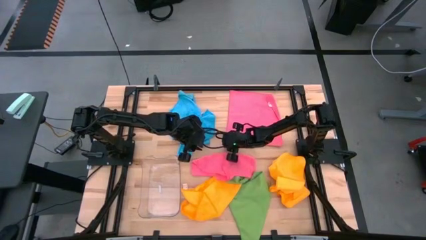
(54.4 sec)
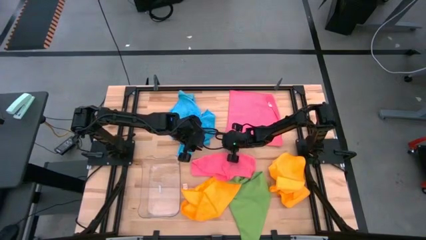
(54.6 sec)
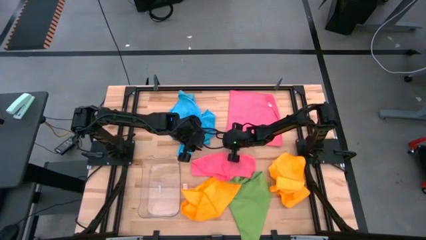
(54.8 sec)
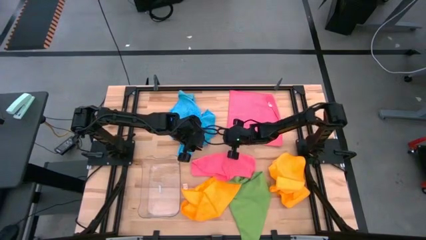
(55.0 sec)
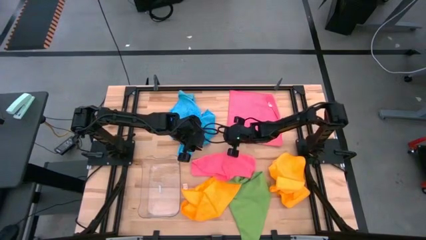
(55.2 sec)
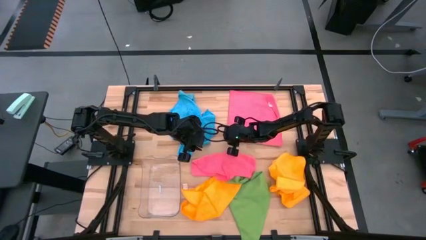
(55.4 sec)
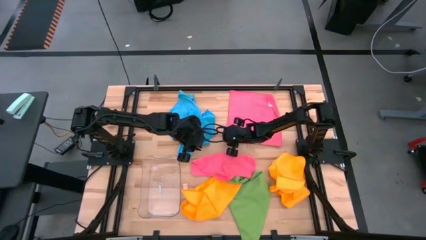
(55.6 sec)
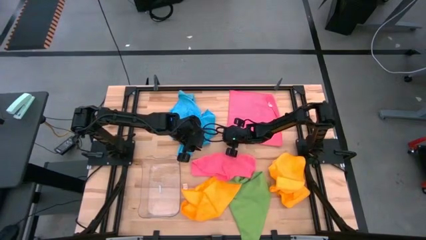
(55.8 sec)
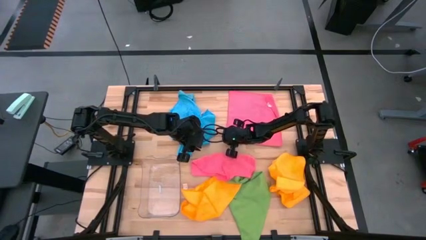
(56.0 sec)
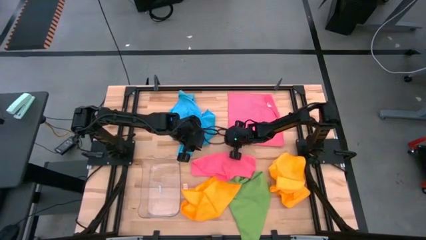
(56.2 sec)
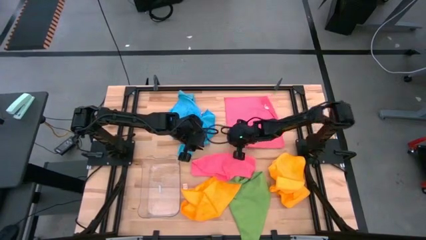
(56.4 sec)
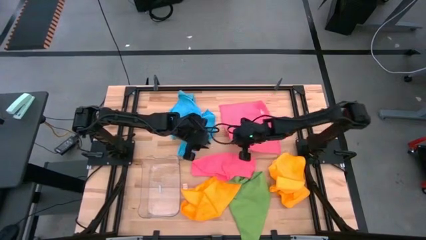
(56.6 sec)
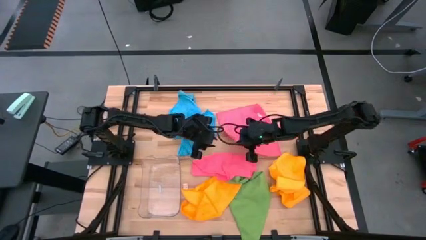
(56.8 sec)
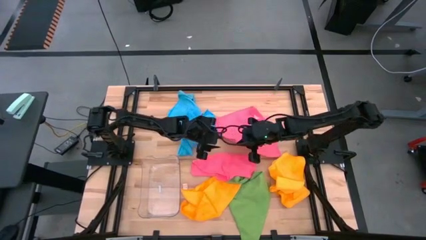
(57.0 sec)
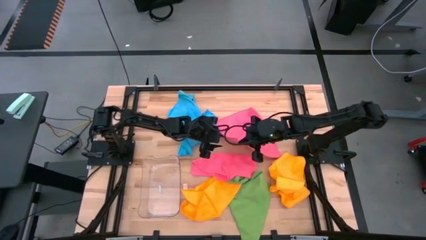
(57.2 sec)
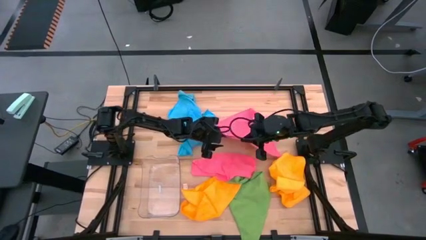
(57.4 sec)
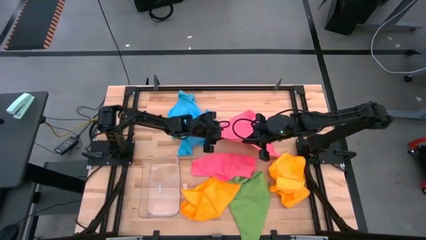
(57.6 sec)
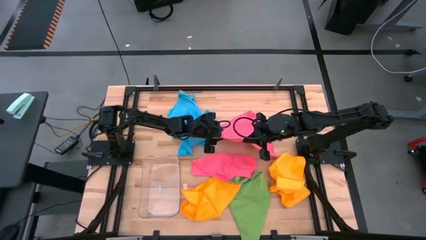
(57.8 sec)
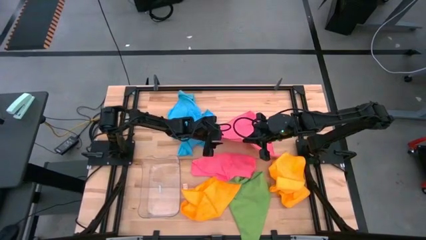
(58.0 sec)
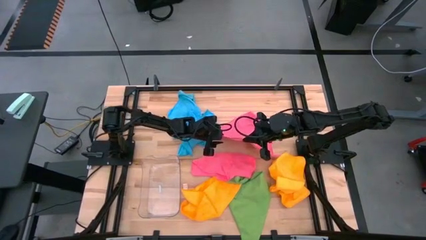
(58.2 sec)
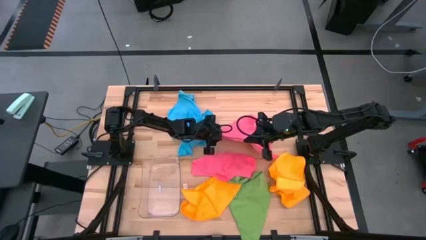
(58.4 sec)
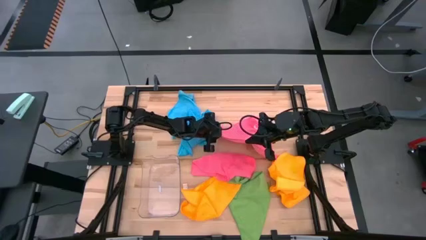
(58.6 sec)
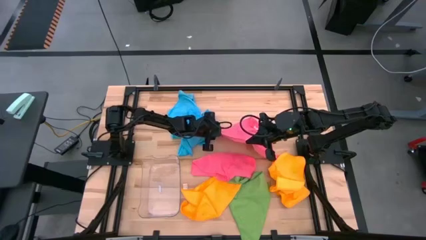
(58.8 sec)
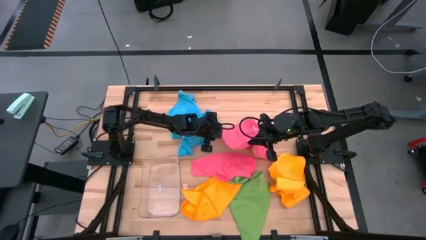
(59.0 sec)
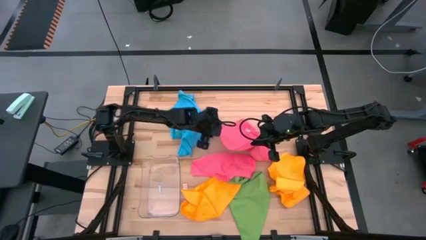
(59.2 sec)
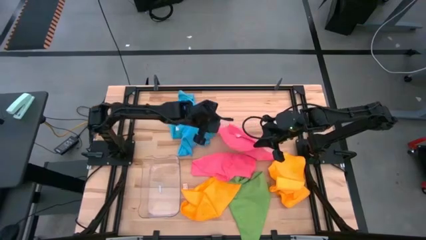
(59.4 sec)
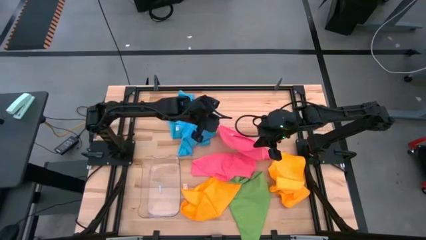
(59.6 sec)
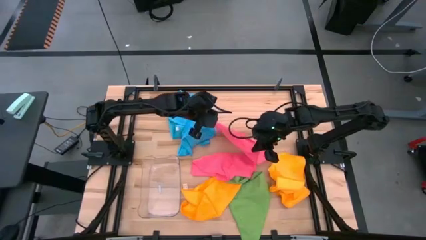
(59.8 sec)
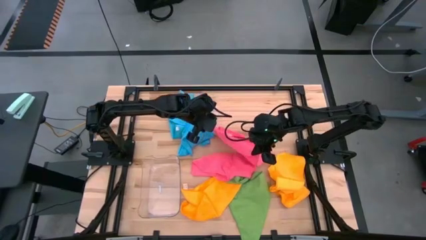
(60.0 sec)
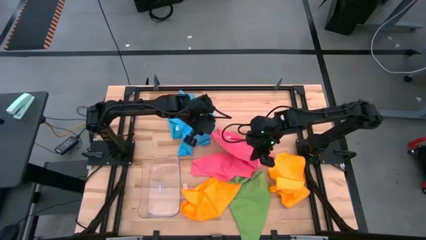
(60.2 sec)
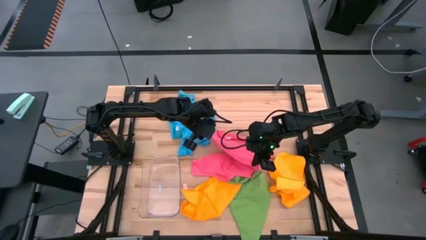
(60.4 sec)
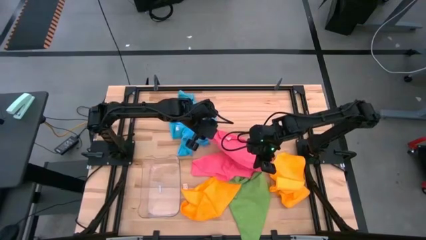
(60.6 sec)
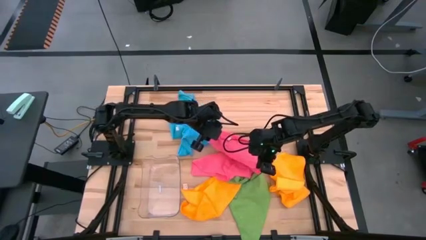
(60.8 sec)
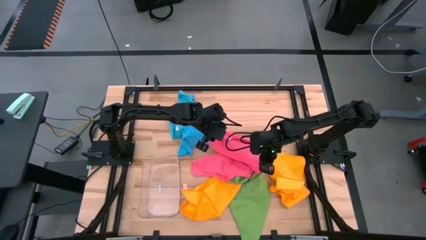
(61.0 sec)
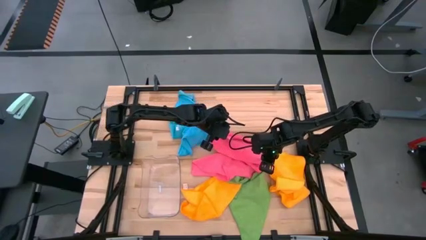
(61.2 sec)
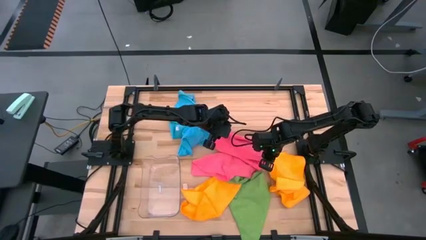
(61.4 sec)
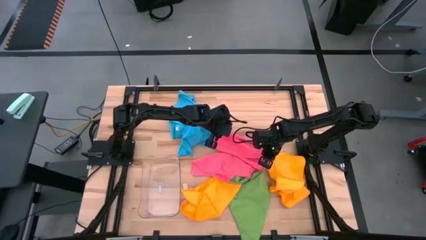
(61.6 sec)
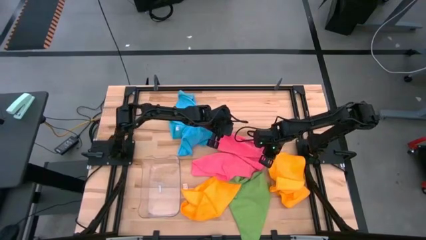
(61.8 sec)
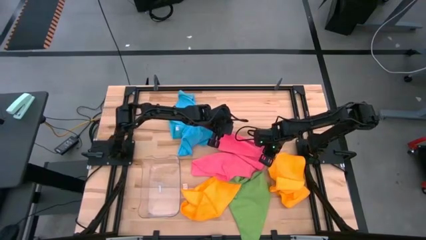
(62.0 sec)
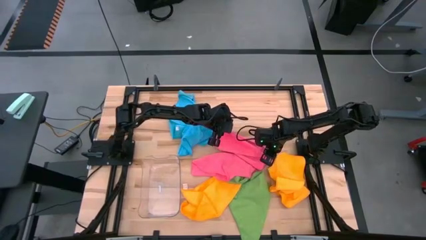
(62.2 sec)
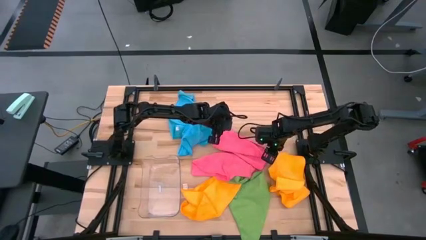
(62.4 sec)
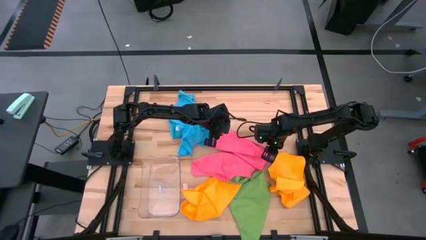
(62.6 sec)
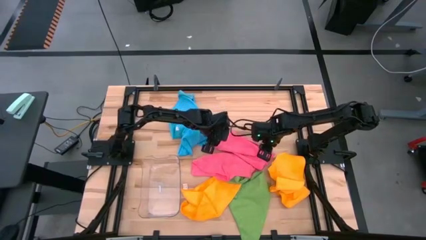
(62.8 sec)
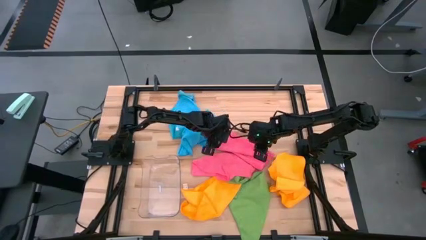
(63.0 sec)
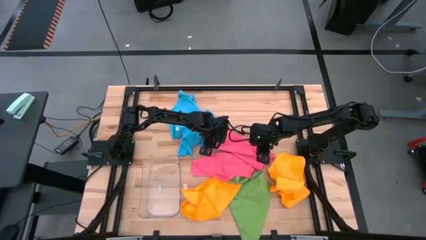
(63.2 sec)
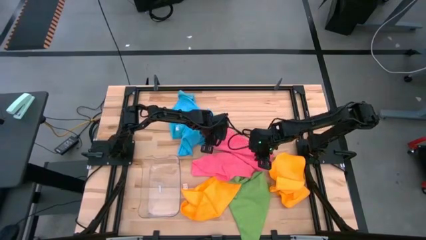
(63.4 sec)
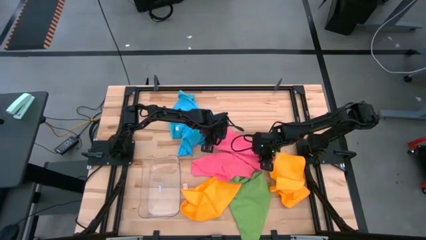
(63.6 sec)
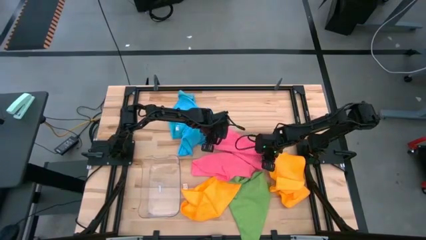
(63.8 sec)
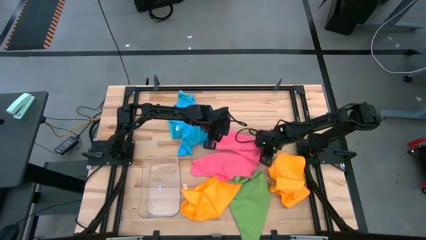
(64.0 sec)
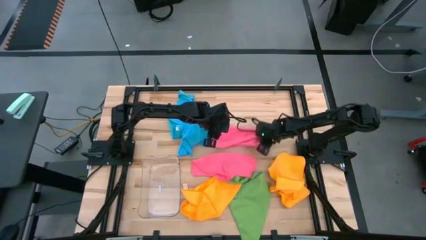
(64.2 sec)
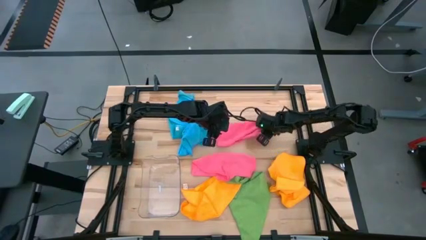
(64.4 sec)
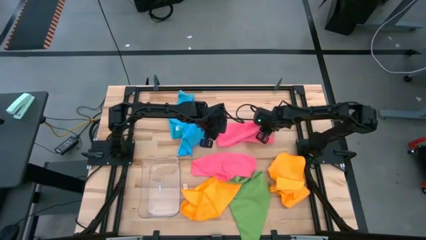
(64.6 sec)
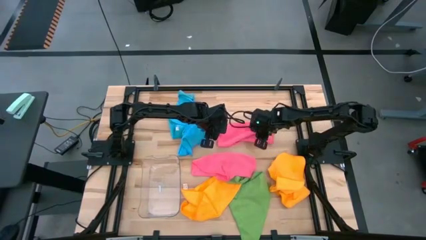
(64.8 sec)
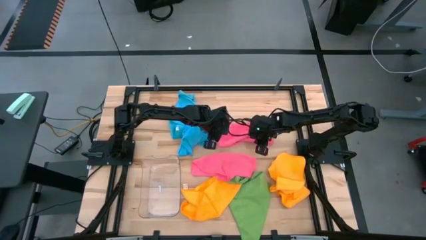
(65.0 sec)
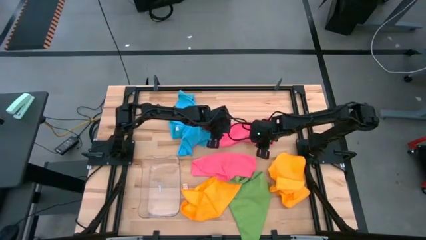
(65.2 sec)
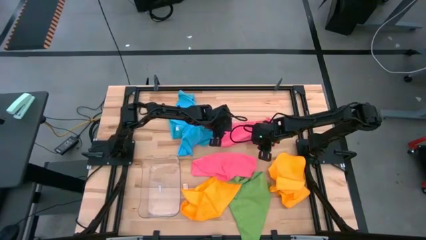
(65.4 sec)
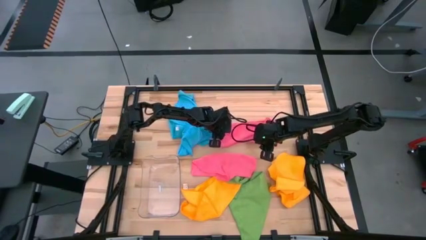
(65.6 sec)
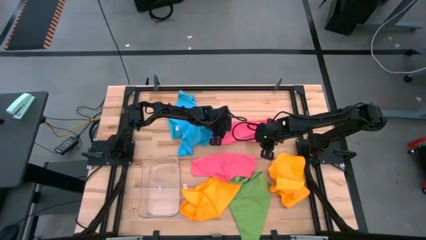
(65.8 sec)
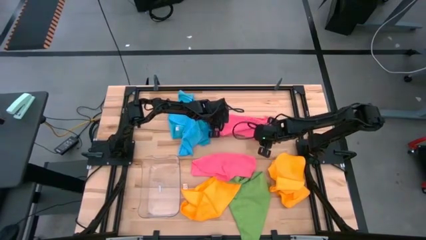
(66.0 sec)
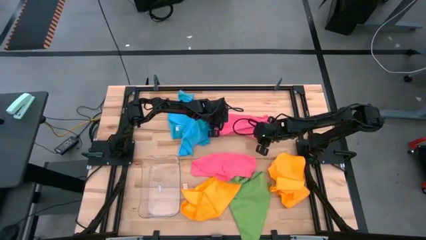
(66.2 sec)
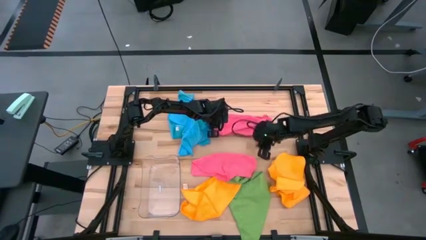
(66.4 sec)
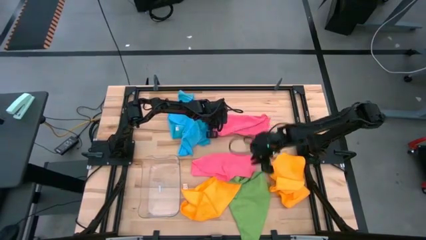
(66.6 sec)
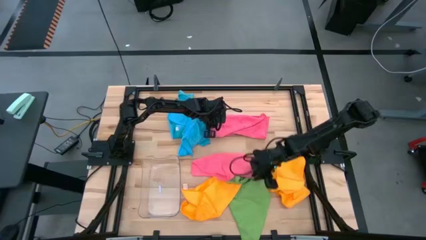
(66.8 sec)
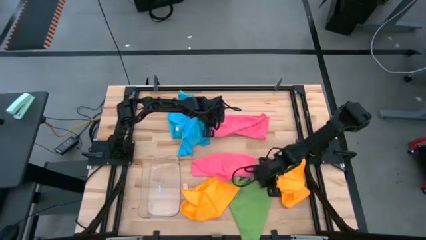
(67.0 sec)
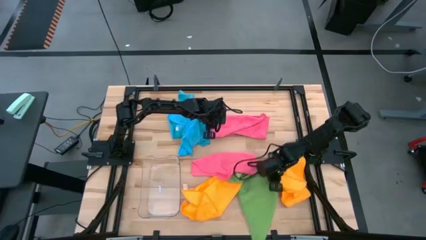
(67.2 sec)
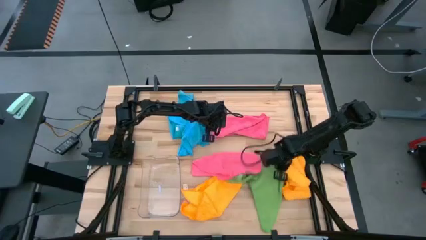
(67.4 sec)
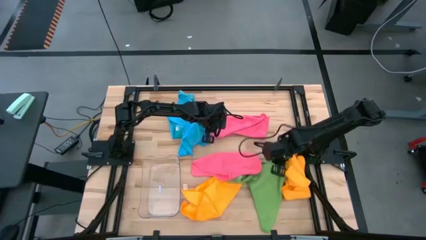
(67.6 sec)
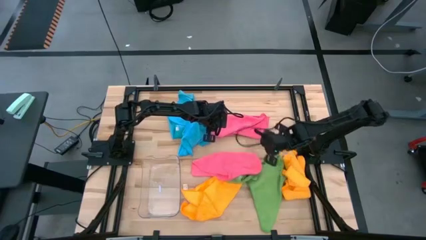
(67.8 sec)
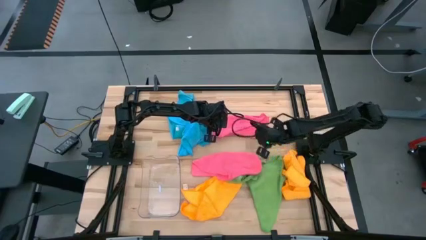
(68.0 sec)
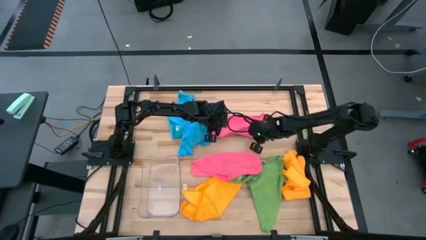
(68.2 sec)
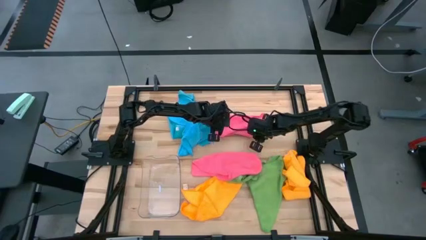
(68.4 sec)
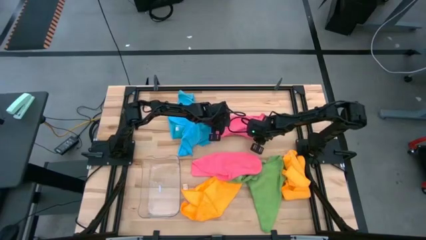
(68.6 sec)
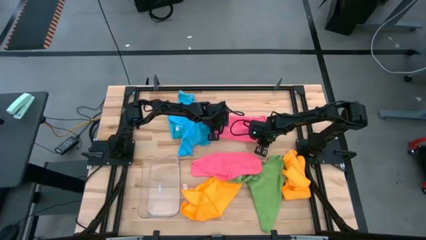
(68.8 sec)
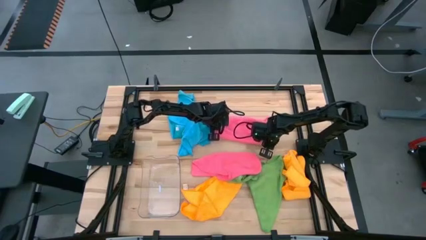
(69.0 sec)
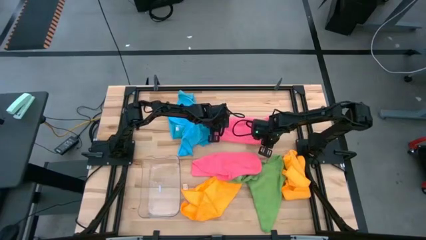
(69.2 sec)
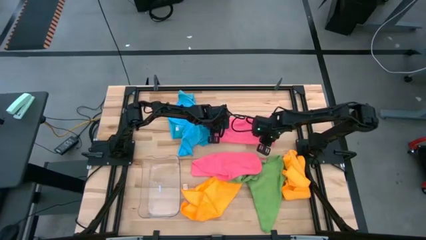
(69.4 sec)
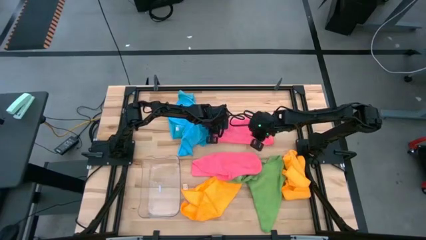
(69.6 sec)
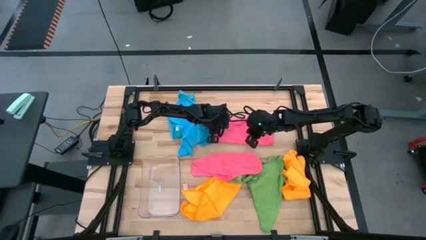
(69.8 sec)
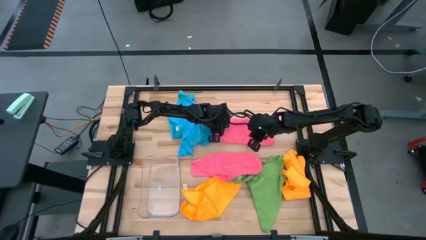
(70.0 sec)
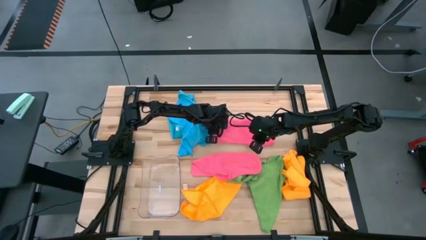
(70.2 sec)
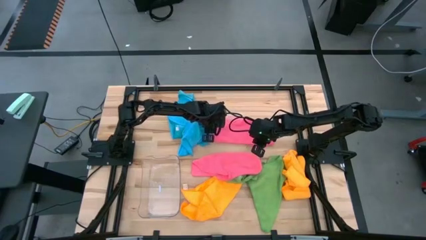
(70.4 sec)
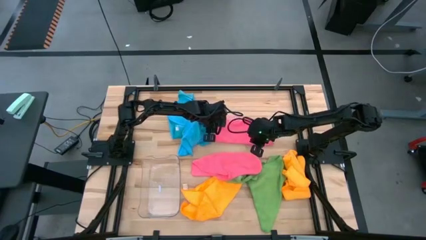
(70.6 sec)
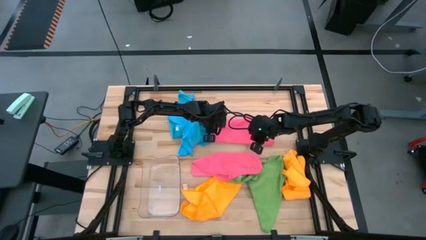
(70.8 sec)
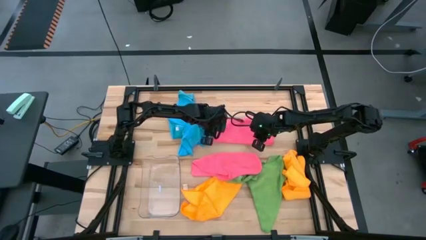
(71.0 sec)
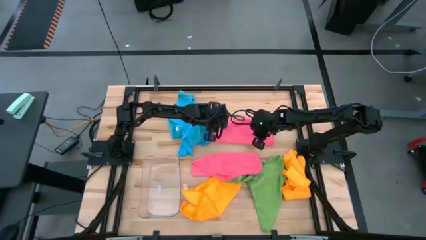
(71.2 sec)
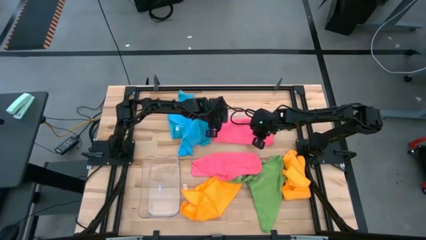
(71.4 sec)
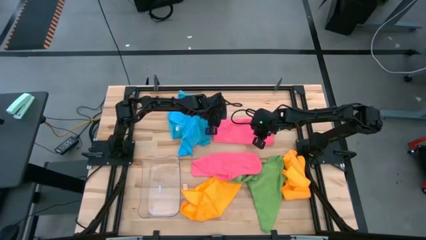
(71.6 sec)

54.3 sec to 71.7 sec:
Task: Fold microfiber towels
Fold the top pink microfiber cloth
